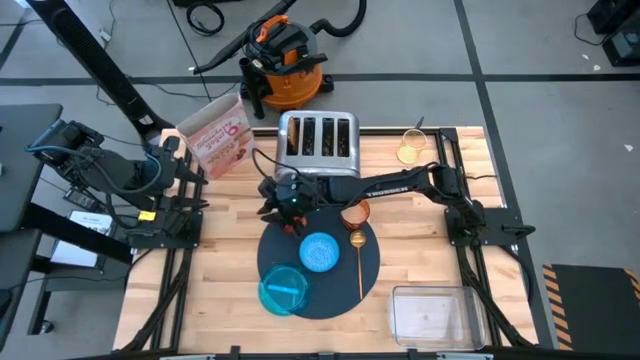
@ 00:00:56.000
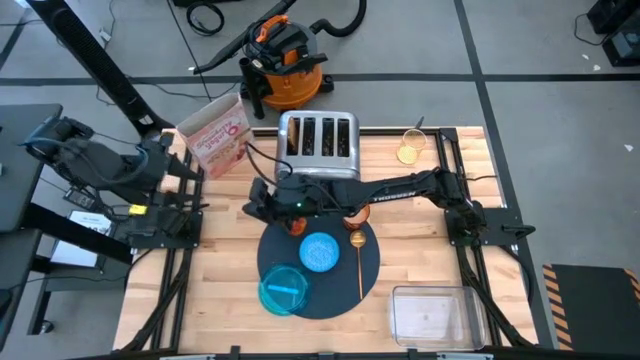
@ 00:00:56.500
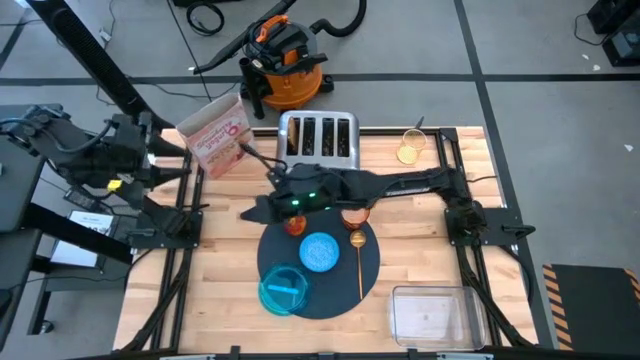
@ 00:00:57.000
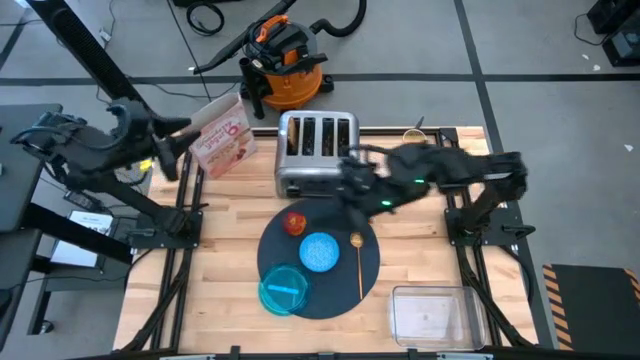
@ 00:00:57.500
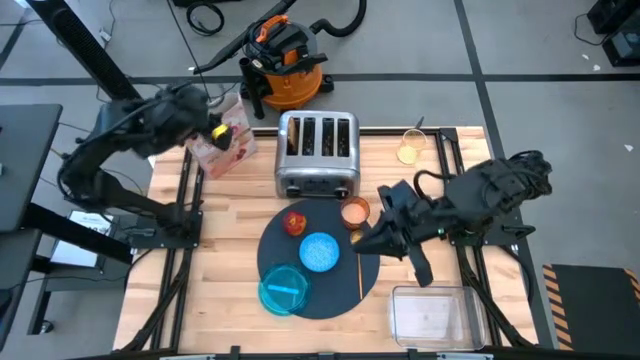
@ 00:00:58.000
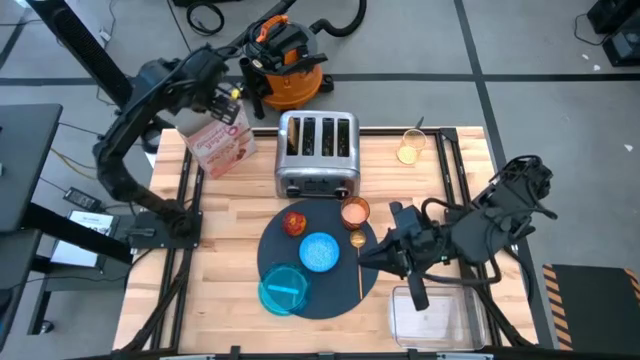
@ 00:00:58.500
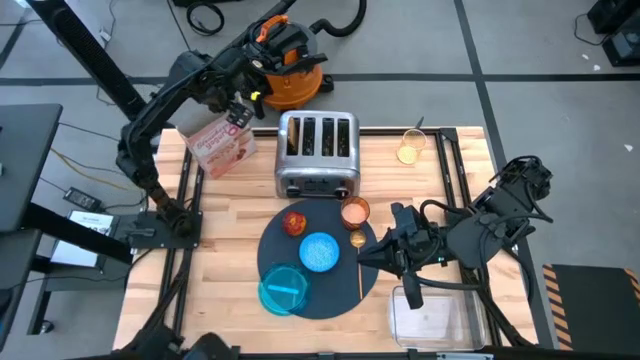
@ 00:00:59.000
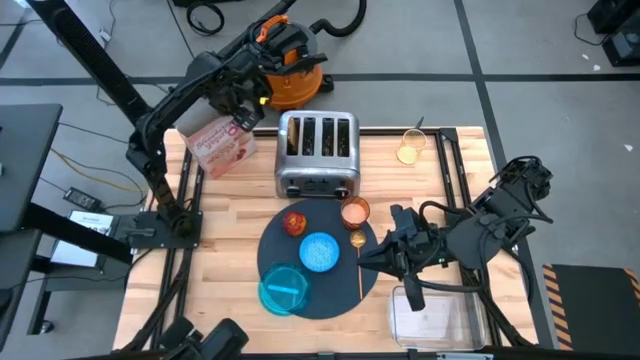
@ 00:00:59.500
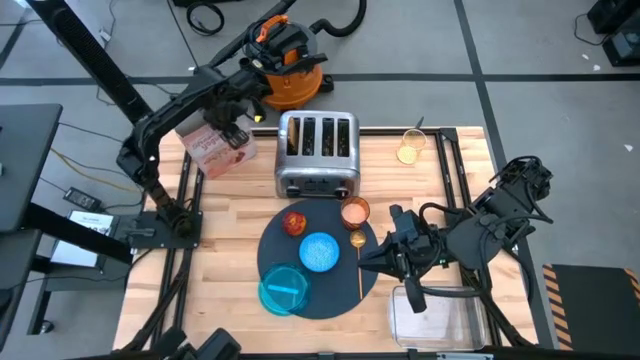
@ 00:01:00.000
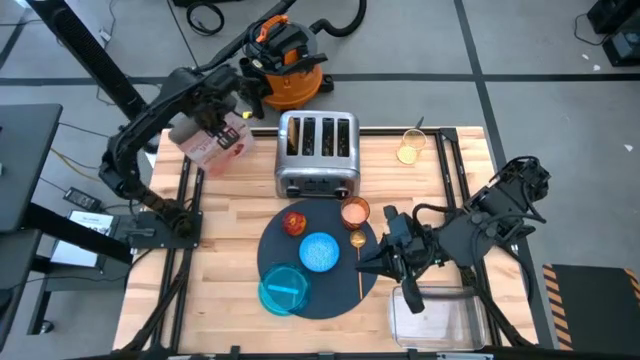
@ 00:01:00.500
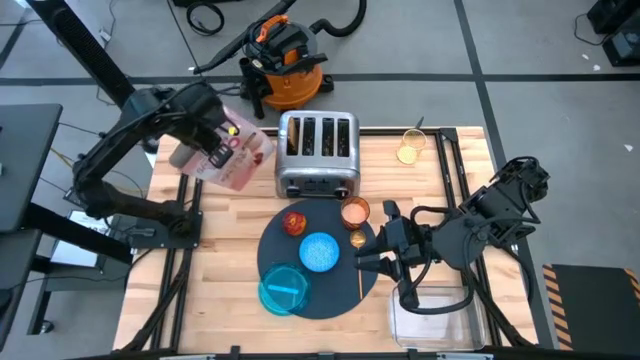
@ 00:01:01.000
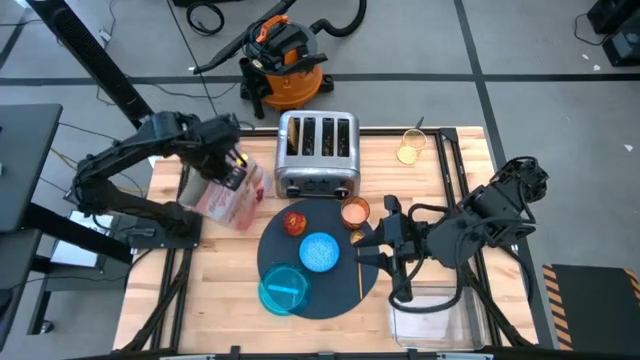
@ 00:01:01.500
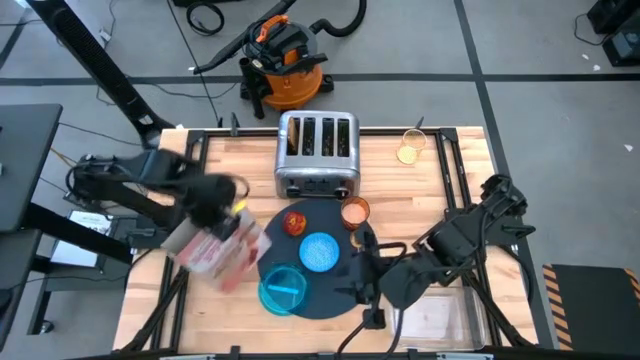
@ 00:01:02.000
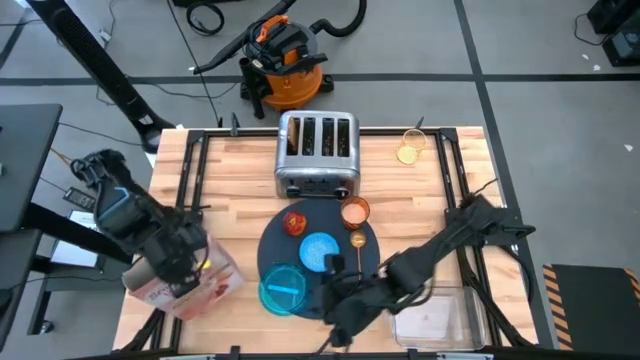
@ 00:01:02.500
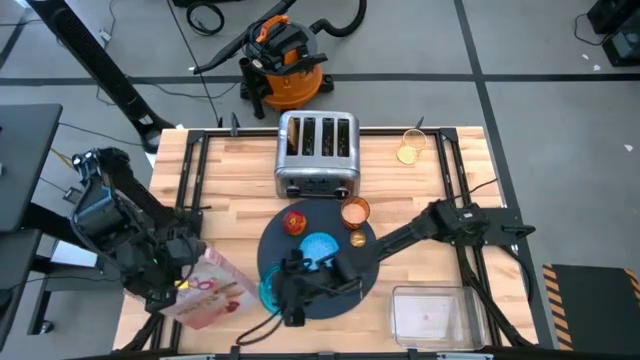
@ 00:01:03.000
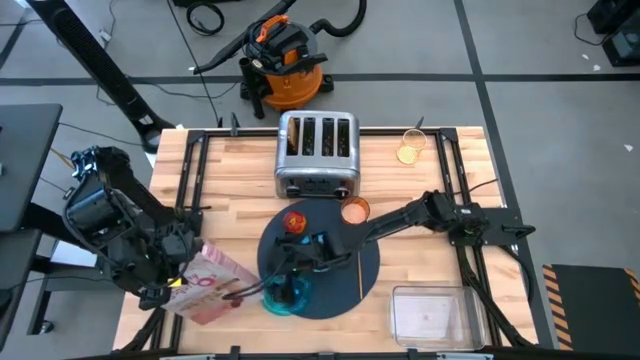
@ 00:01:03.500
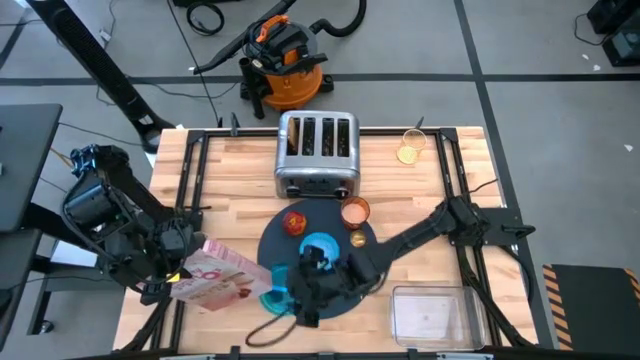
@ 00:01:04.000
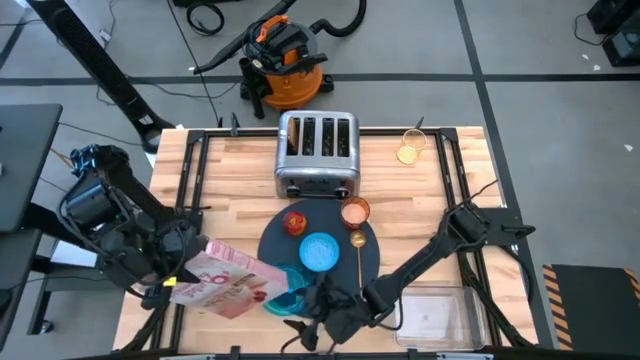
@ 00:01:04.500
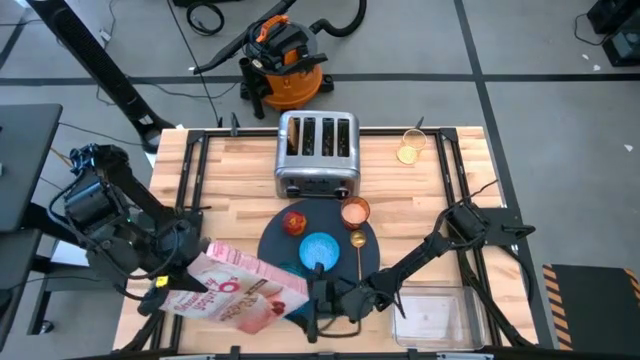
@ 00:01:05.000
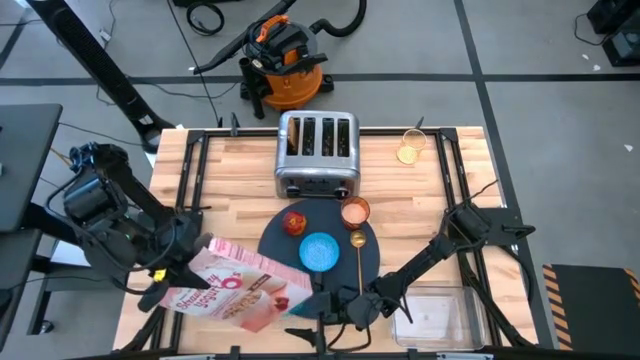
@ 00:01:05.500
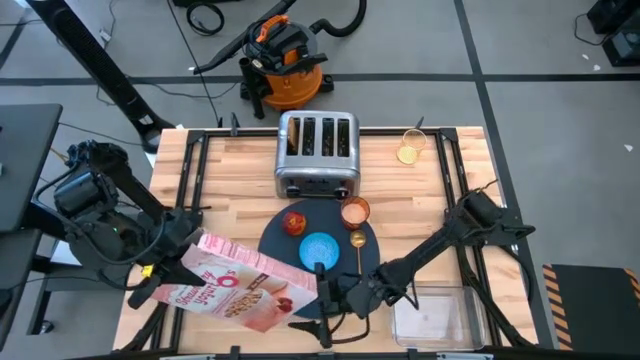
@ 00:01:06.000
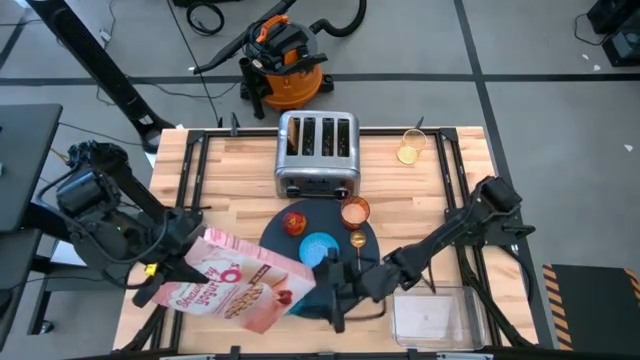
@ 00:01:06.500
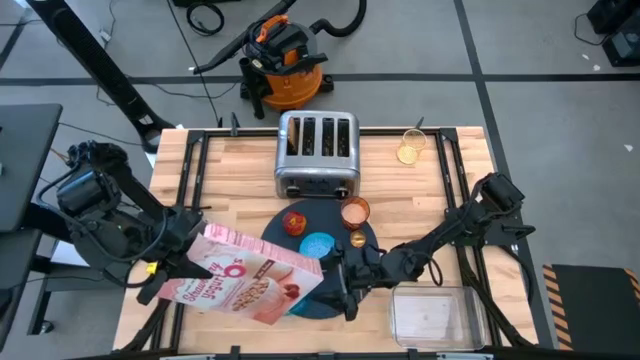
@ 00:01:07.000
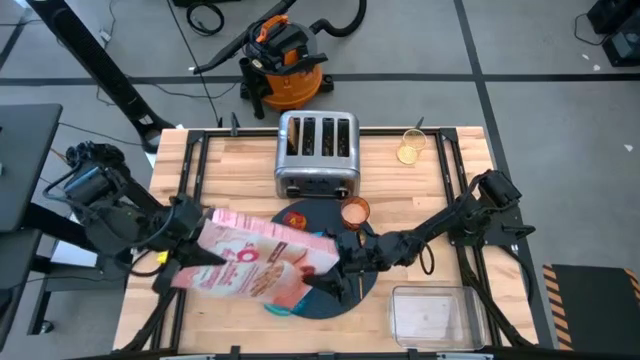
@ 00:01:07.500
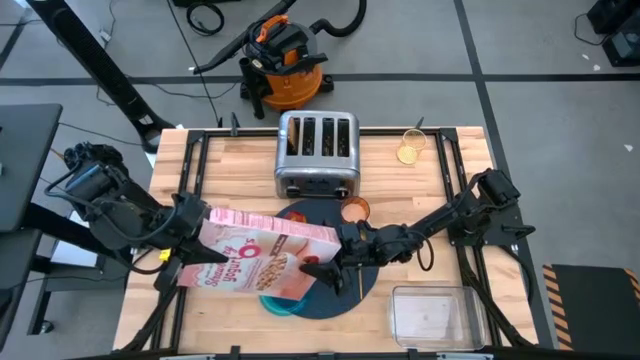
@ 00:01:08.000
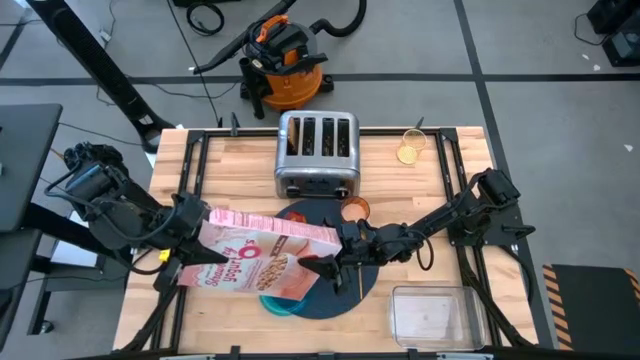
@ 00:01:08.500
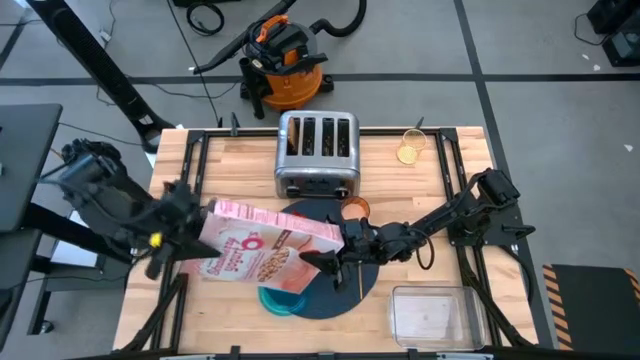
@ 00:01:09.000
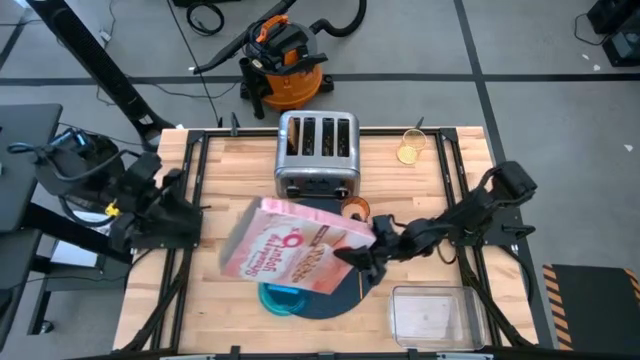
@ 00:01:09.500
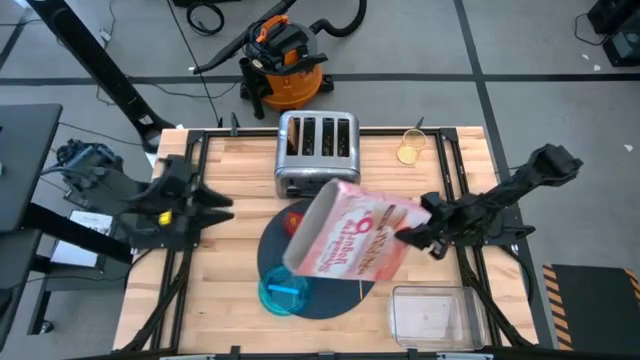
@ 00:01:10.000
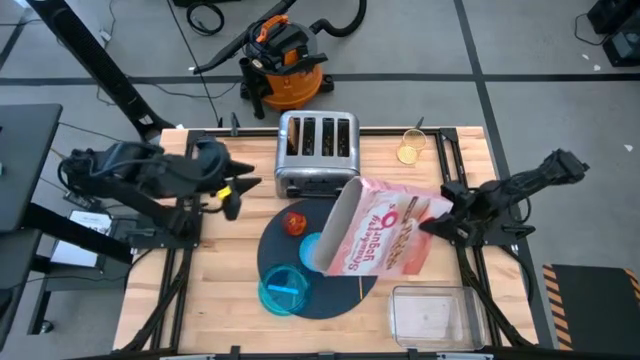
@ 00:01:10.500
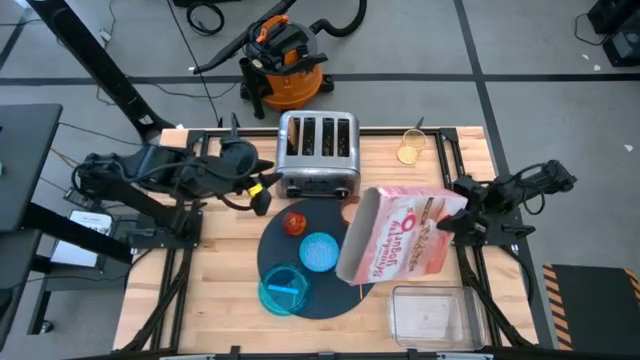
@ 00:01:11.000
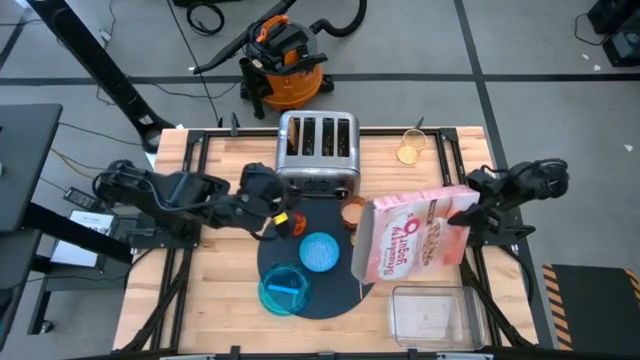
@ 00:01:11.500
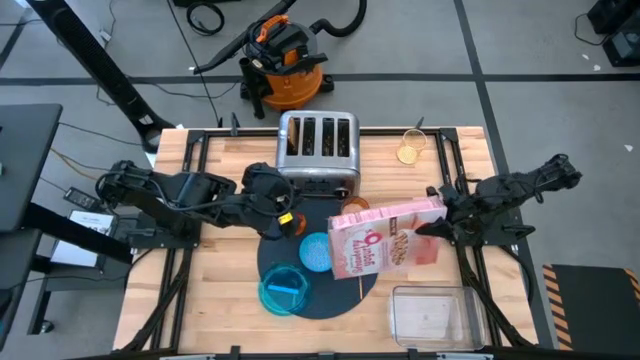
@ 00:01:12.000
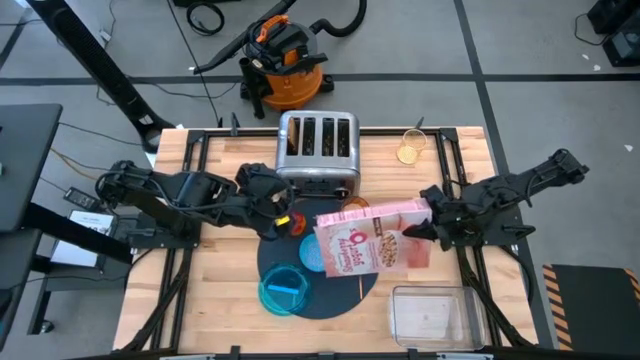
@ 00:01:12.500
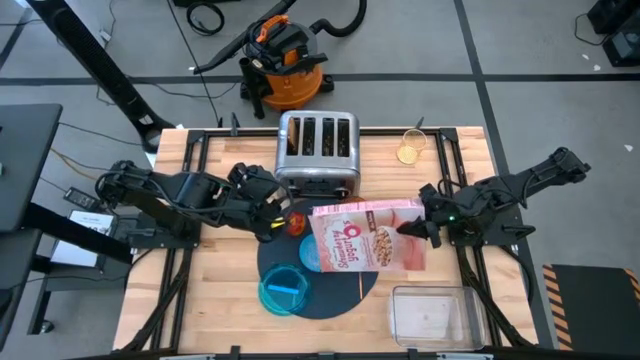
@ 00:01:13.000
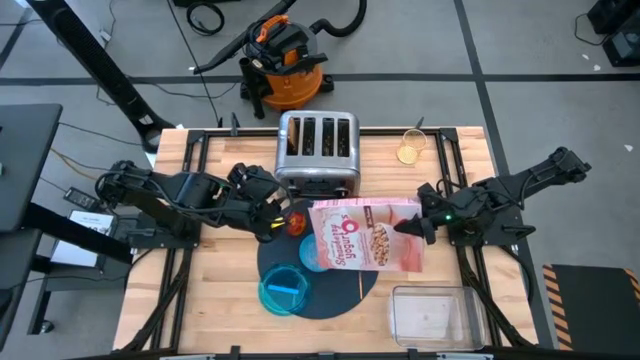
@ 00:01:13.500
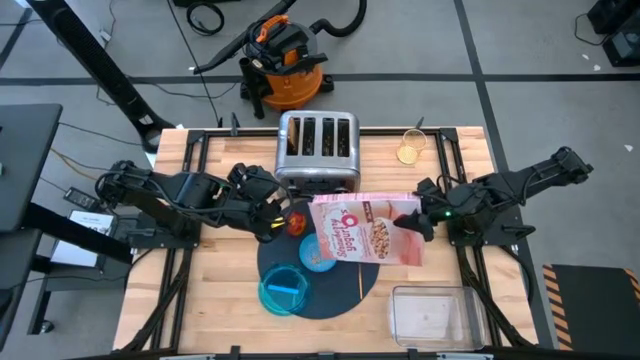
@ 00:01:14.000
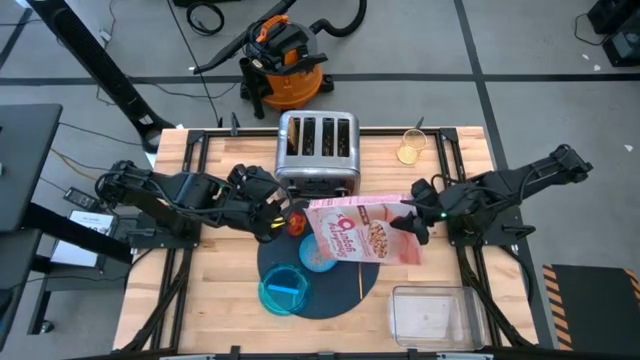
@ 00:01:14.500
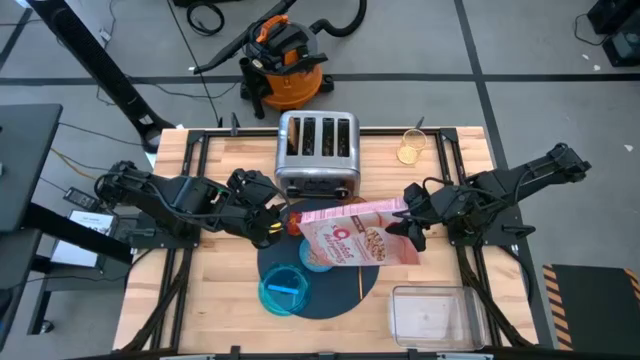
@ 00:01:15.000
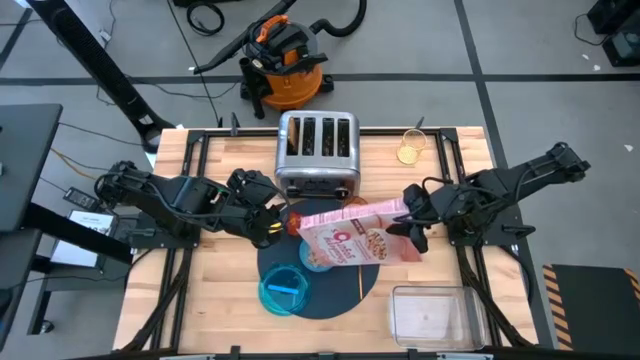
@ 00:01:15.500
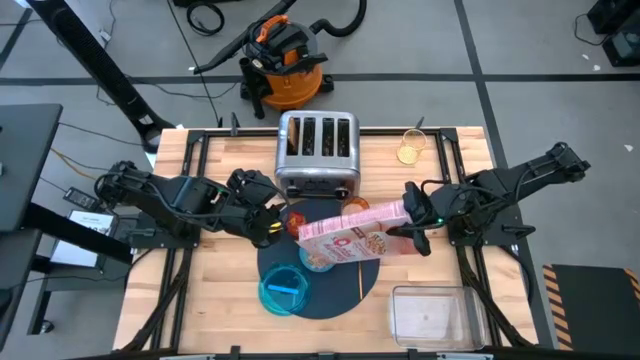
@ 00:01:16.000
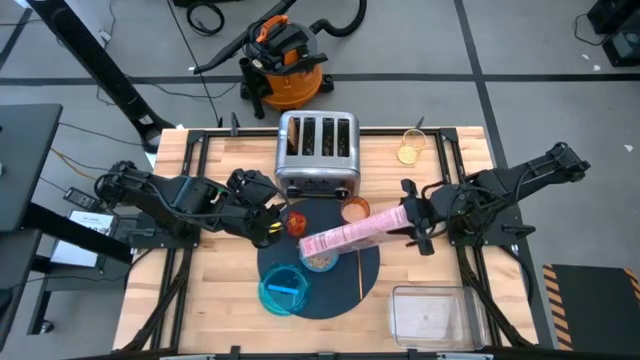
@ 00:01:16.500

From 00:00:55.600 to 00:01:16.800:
Task: Arrange a breakfast setting
Pour the pink cereal box into the blue bowl
